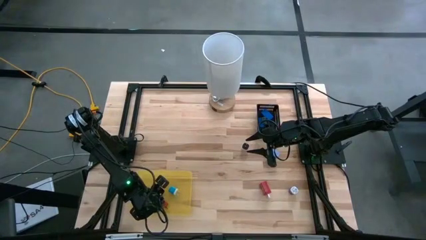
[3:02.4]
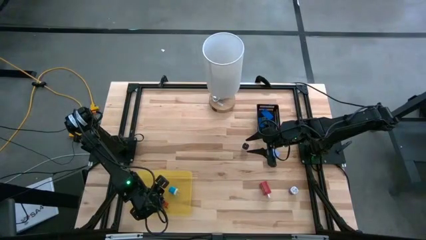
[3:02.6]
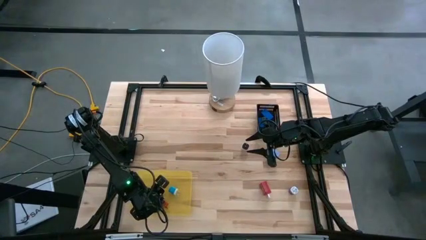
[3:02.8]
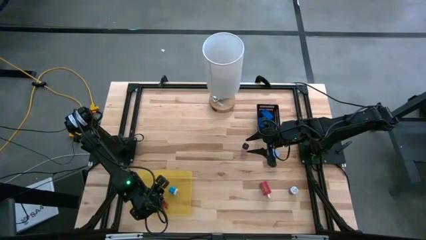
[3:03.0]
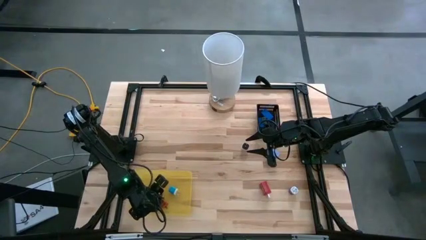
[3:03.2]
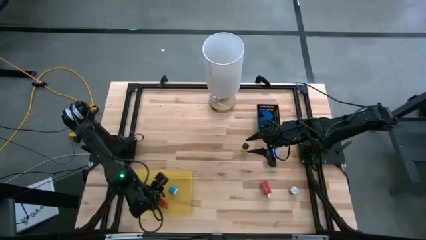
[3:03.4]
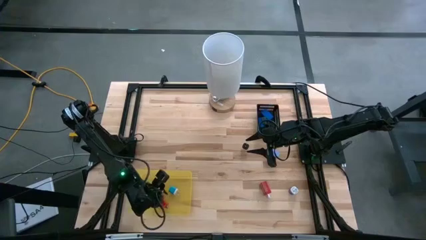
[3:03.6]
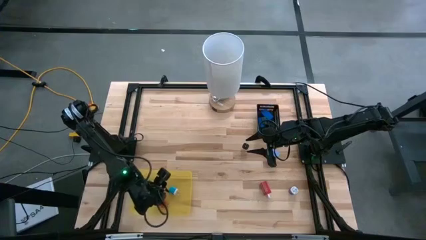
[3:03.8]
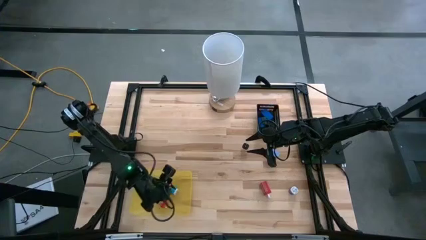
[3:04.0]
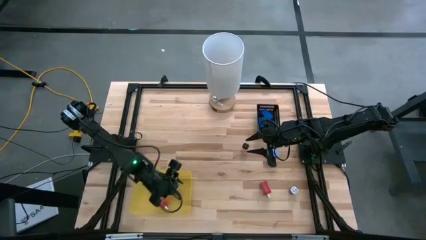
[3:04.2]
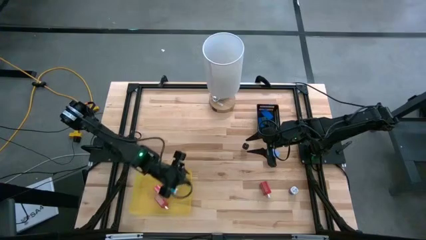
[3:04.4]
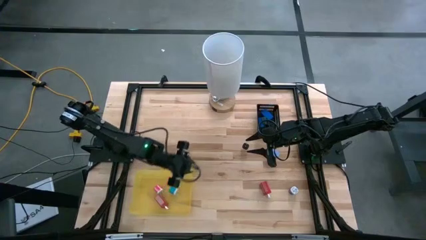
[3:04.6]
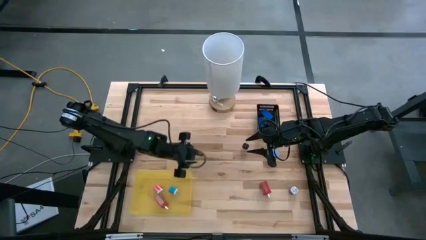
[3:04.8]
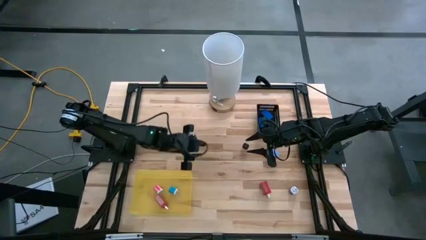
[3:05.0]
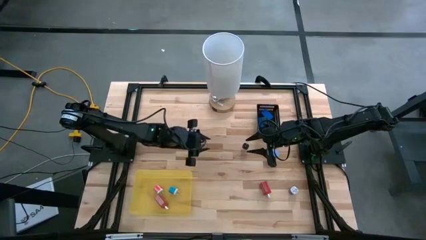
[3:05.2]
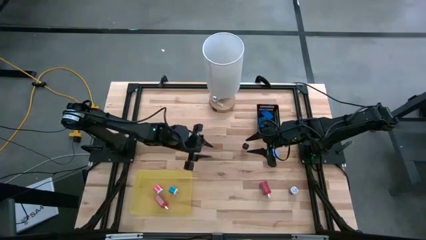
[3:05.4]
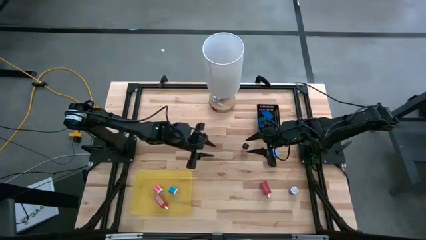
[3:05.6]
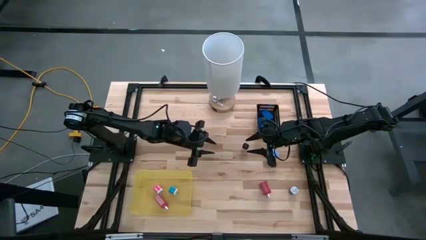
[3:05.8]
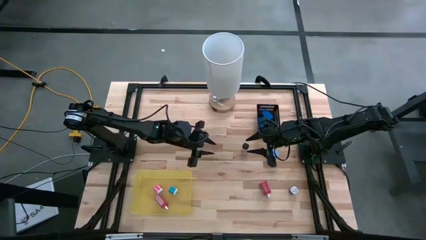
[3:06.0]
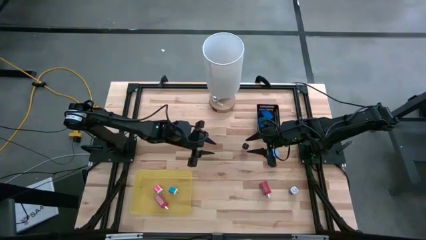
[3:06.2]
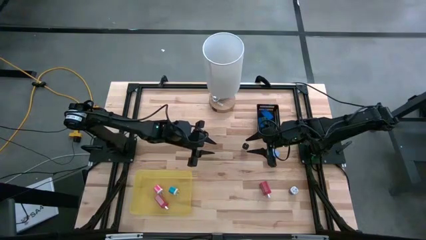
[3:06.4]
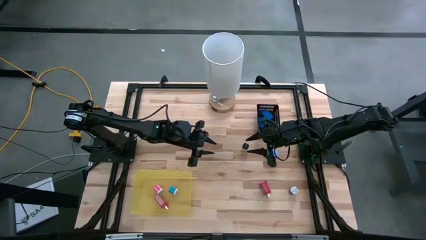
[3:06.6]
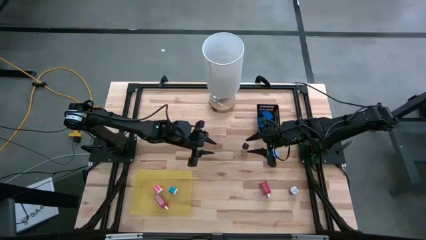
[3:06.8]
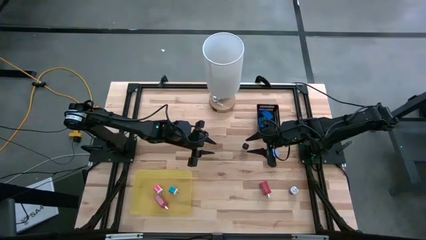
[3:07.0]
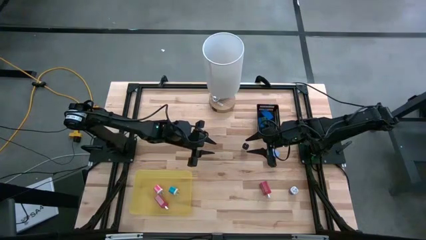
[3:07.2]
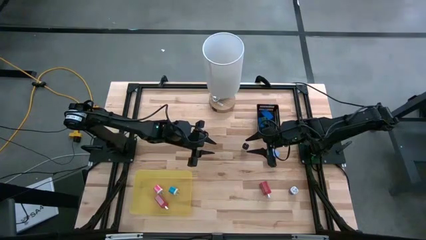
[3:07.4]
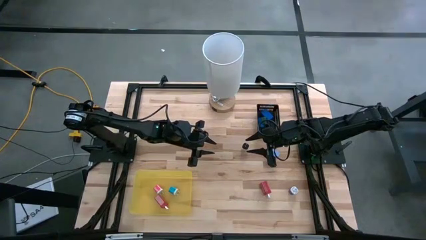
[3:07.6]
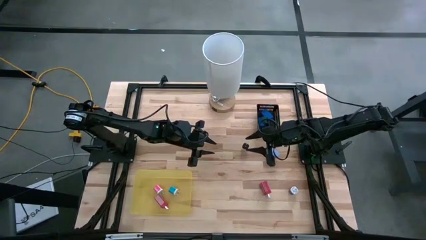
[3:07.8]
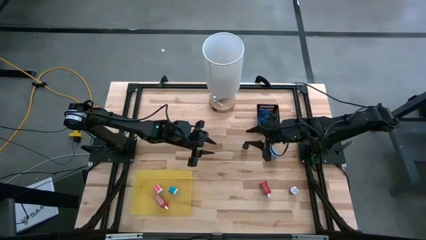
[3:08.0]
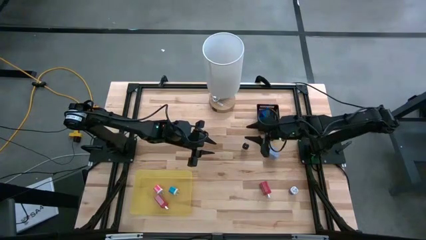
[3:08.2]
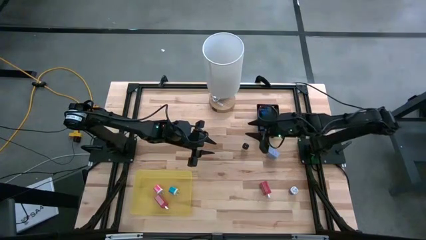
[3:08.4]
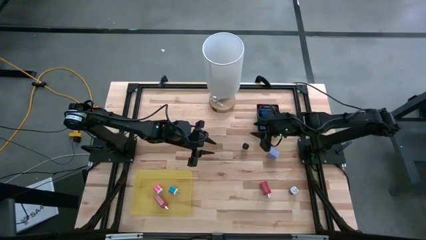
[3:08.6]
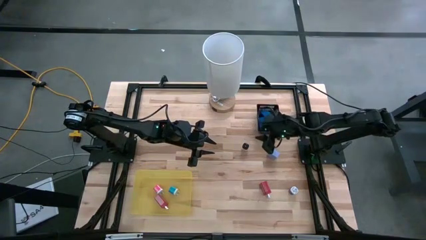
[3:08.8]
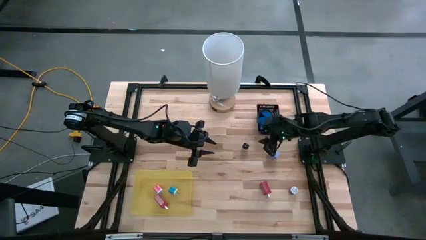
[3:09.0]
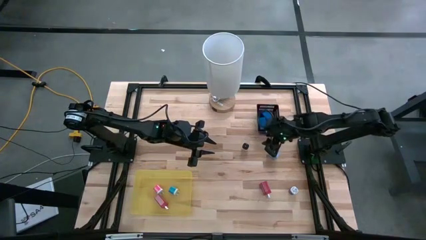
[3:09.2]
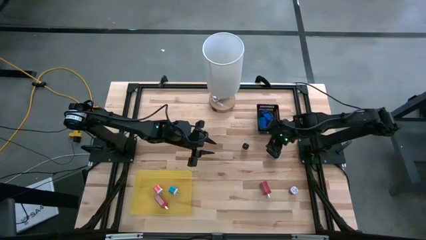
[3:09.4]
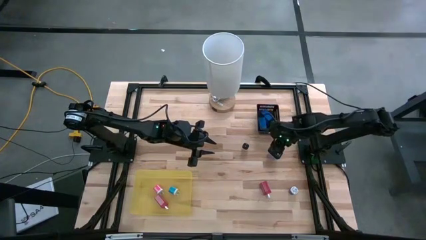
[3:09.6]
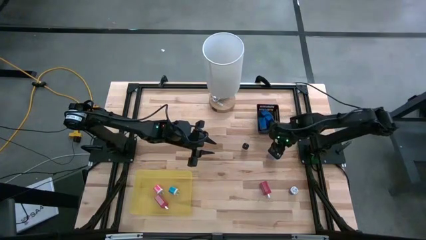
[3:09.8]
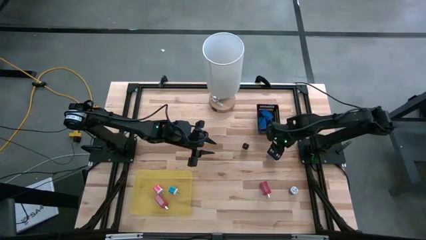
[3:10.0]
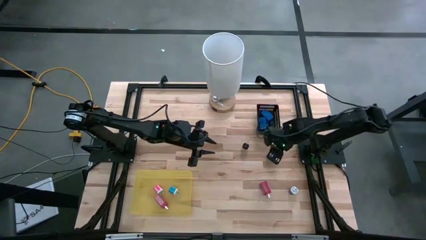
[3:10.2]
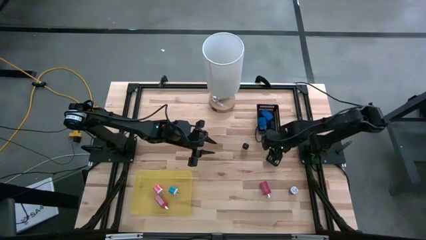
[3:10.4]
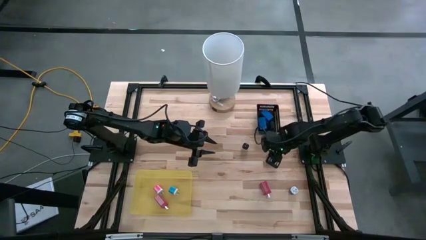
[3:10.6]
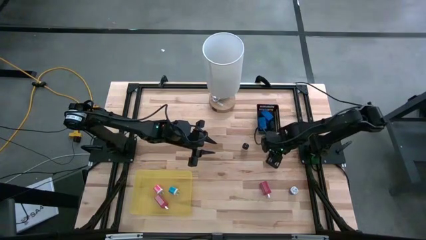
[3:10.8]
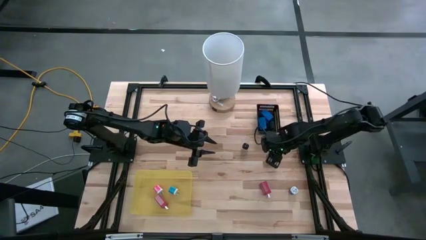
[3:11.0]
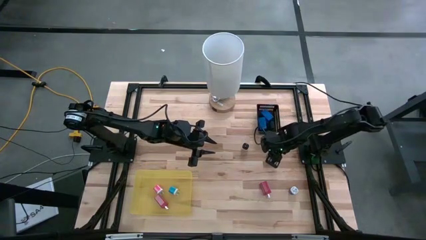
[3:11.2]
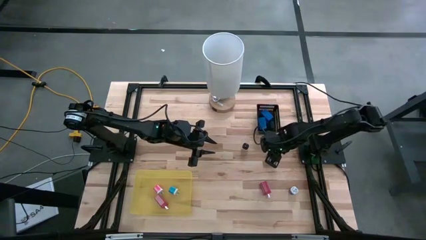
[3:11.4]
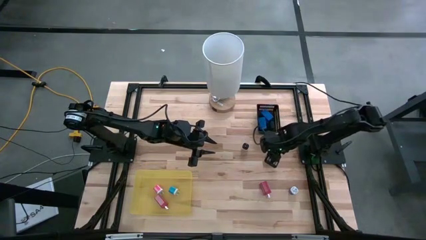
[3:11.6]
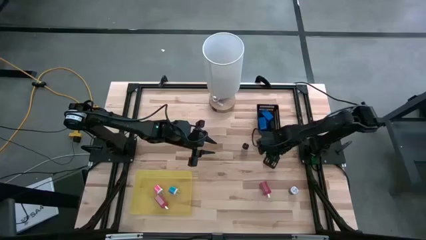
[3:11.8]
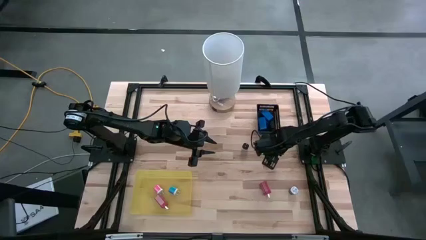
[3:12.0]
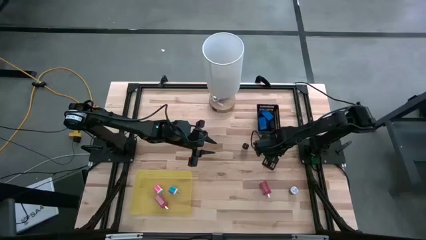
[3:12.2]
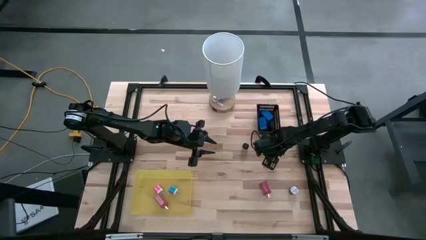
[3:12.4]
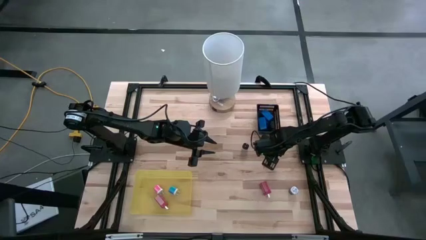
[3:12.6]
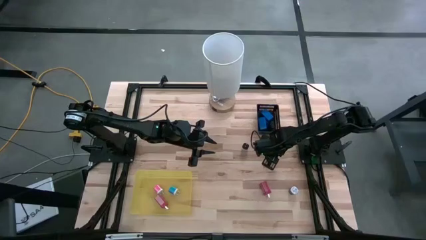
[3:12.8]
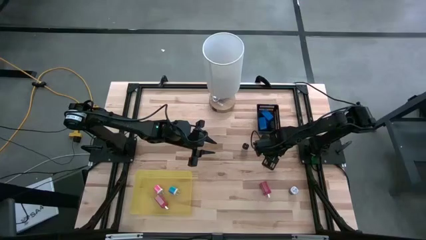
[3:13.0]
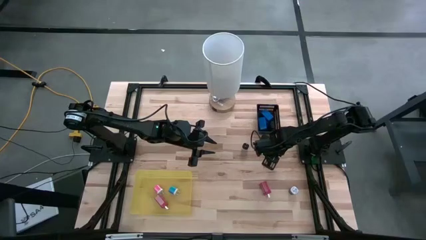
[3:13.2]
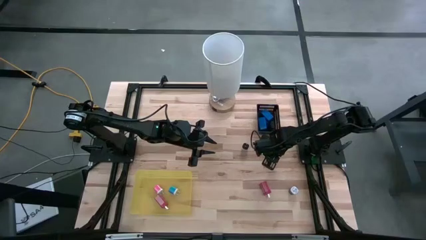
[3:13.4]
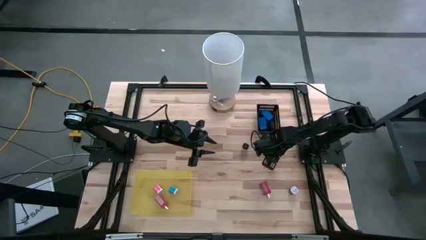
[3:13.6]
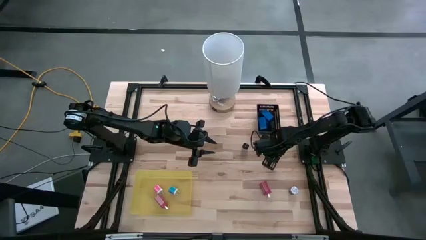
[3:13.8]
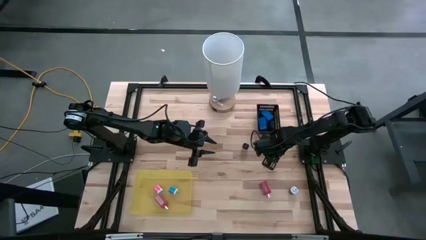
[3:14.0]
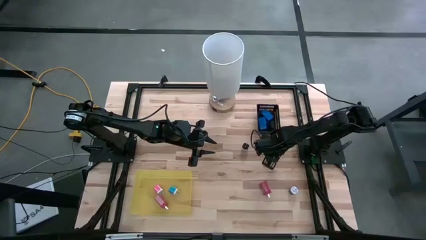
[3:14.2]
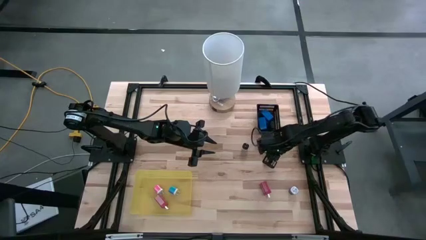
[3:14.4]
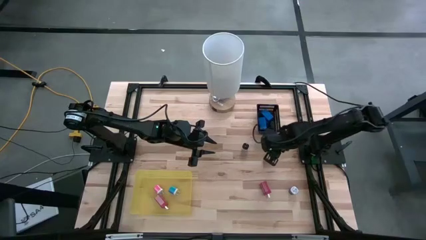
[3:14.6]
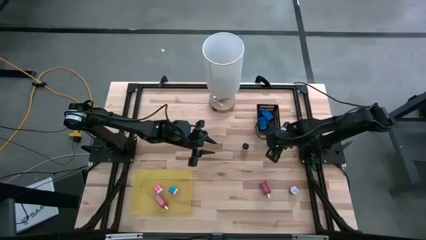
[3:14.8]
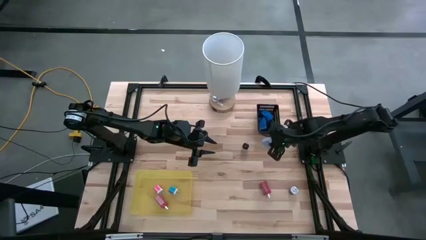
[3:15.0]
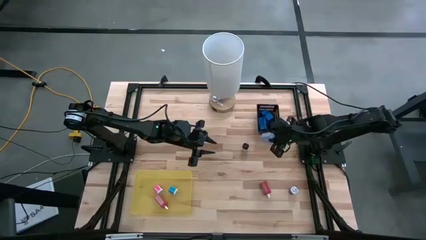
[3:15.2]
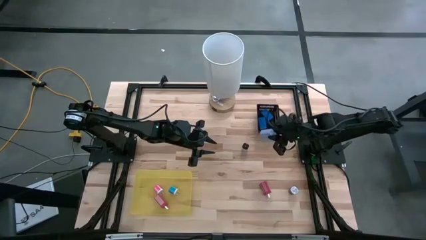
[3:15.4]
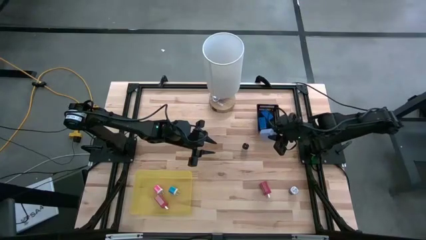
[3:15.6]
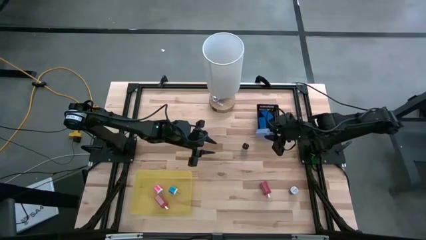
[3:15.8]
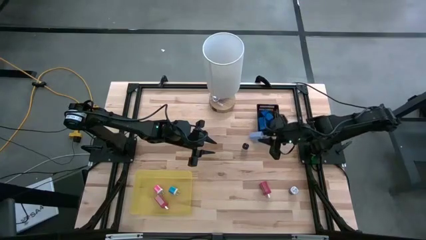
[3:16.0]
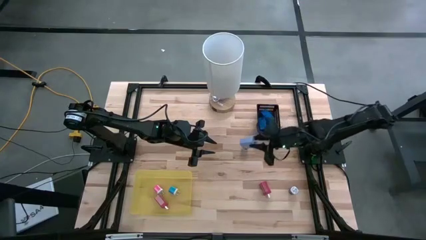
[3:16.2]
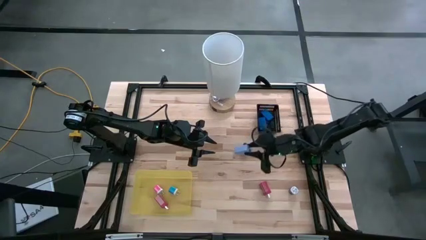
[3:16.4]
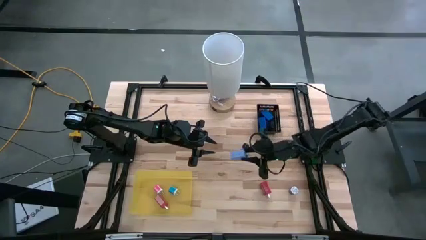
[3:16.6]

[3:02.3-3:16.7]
Task: Pick & Place Office items
Put the light blue charger adapter into the yellow bin

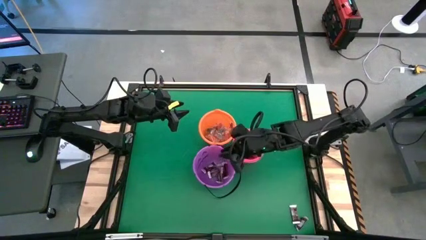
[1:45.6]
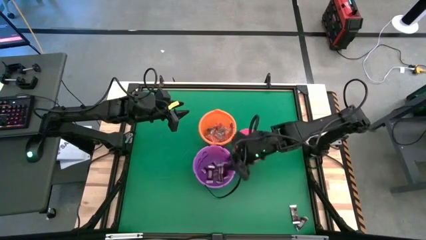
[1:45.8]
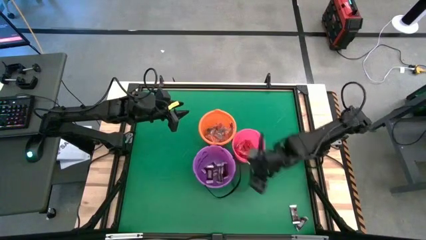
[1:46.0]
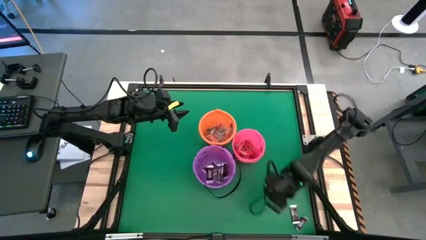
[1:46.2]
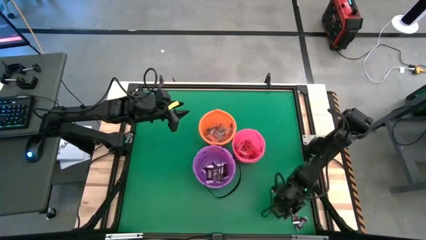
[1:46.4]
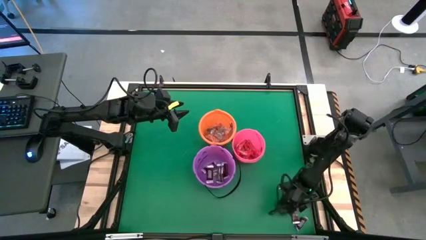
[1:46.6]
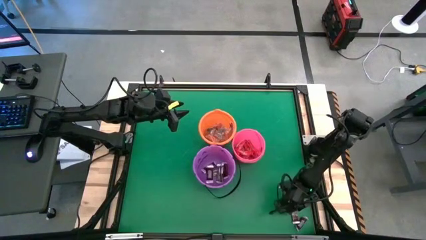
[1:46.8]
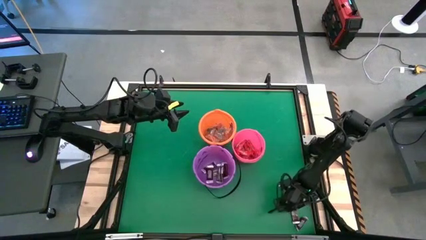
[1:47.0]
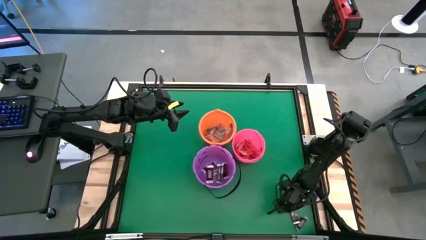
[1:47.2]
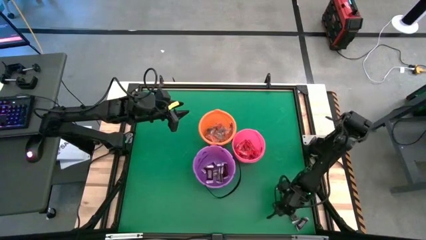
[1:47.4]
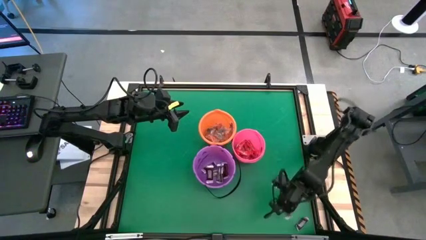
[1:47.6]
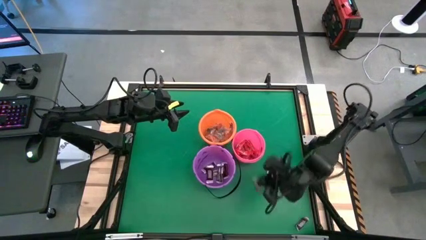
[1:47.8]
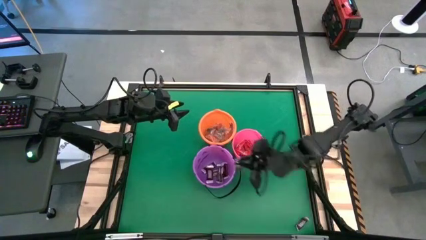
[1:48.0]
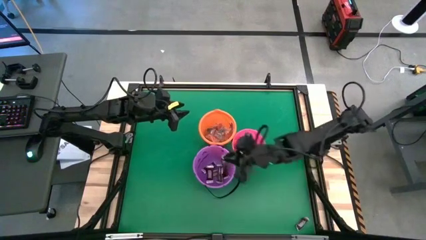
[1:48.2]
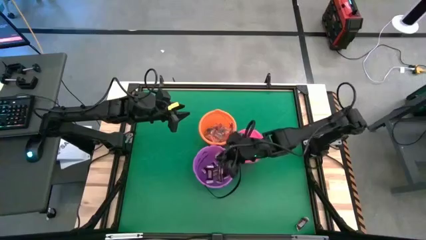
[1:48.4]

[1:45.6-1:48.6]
Task: Sort candy by brand, put in halloween buckets
Put the brown chocolate bar into the purple bucket
